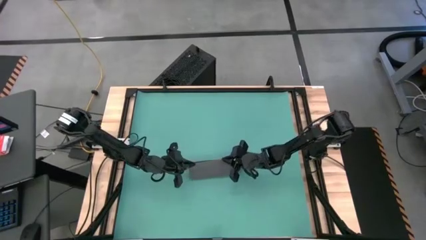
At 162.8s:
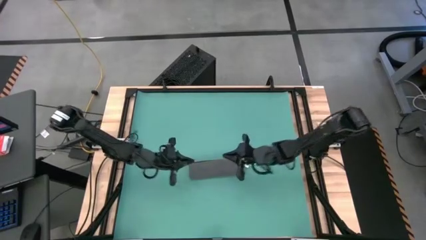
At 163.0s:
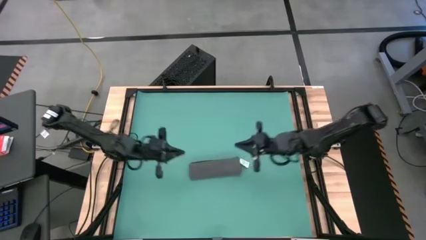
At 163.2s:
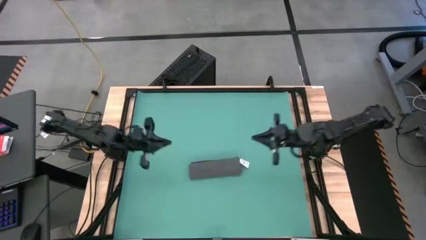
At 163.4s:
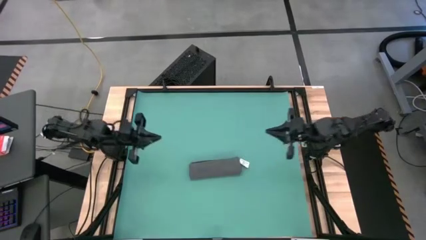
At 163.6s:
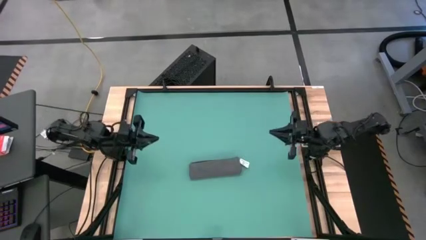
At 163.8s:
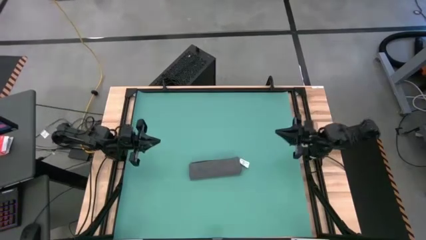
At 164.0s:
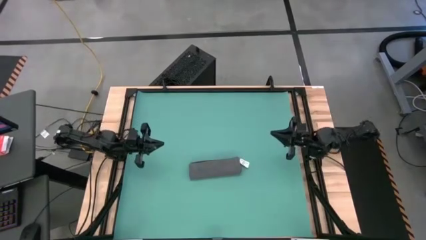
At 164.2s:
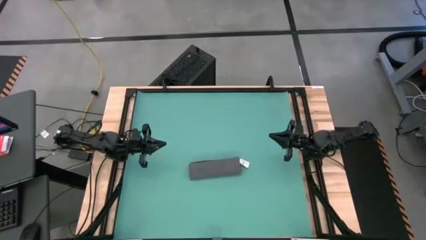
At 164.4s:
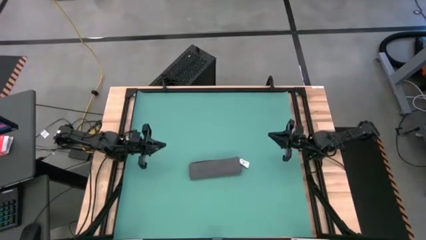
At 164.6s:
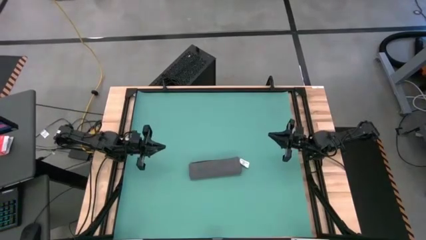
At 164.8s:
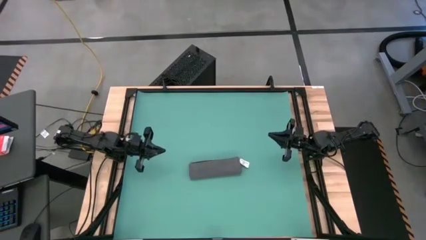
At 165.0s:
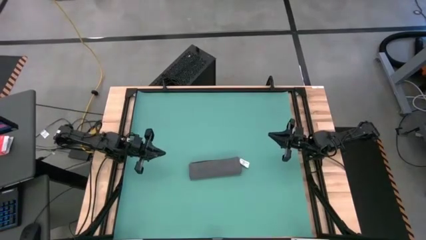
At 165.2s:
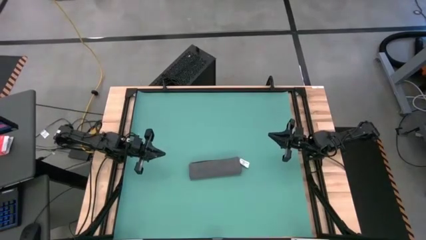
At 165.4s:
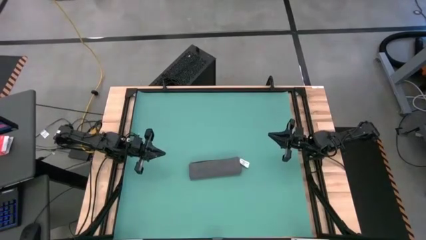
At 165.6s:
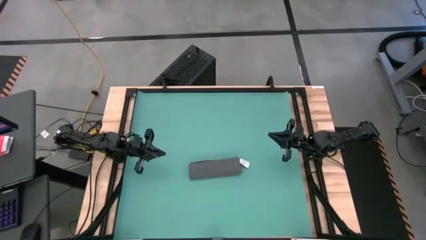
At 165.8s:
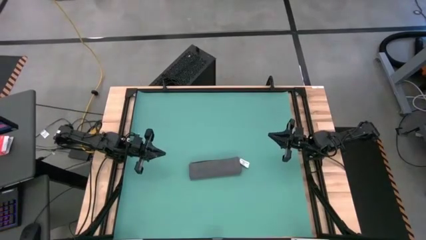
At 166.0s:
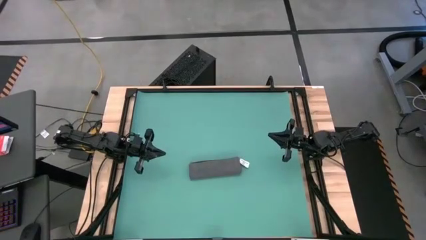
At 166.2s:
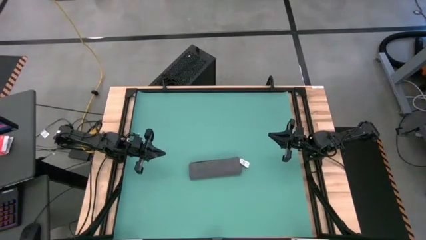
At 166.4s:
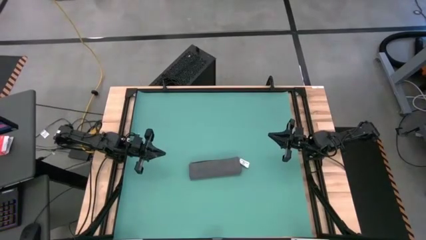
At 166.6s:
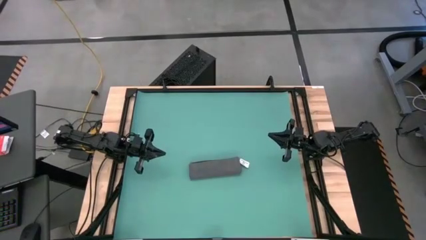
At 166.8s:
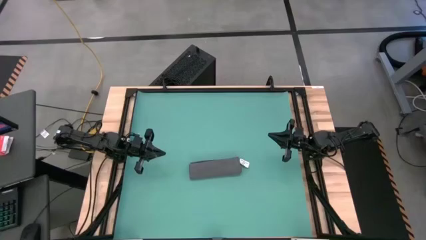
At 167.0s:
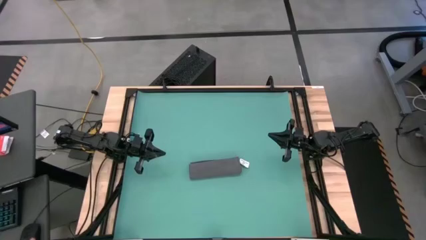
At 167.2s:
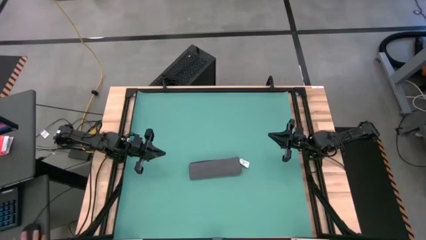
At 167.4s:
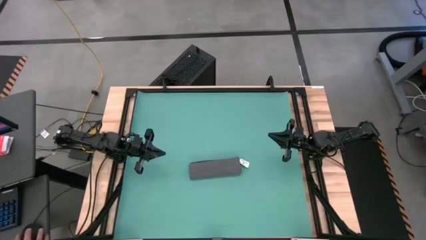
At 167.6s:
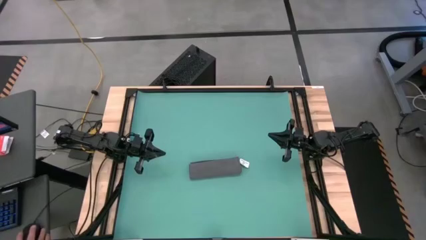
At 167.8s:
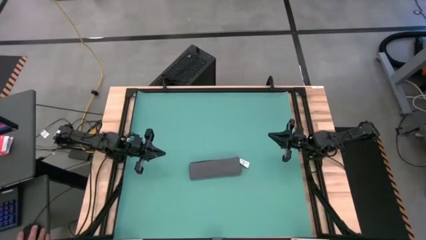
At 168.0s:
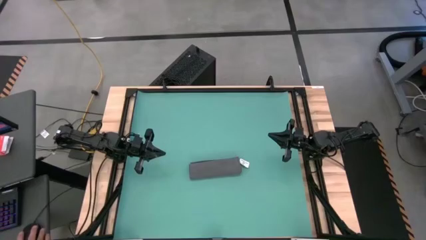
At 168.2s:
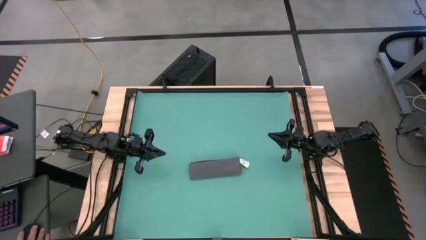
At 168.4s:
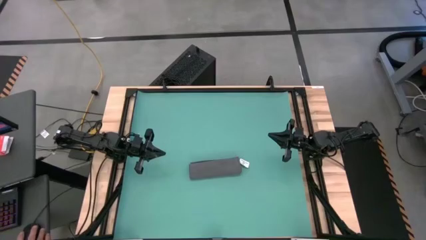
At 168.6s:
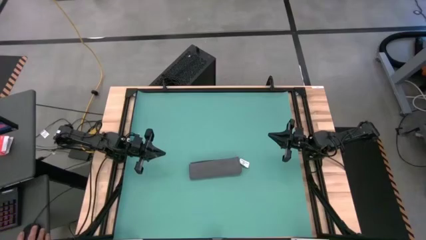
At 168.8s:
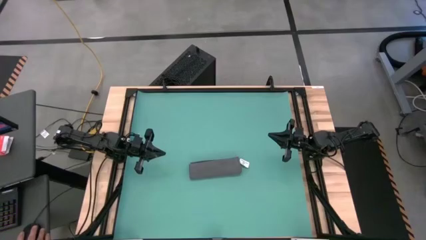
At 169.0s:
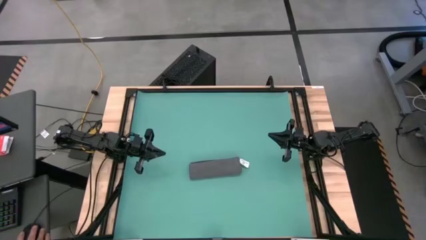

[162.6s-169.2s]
Task: Roll towel
Return to Home Position

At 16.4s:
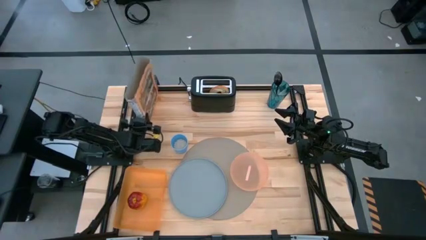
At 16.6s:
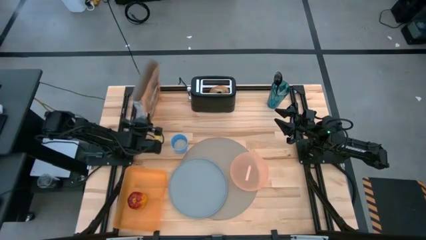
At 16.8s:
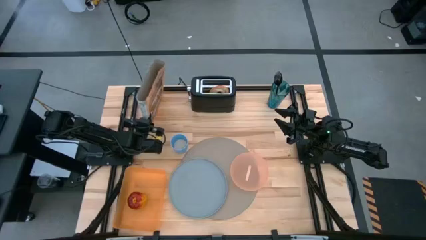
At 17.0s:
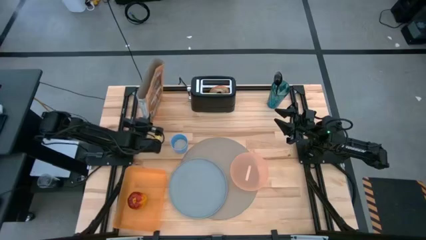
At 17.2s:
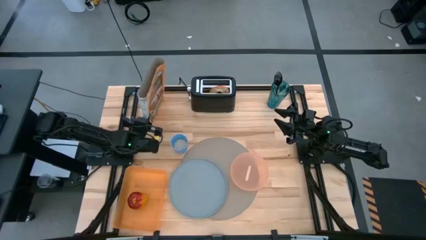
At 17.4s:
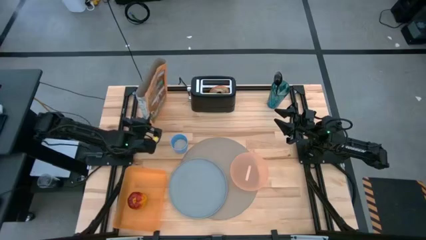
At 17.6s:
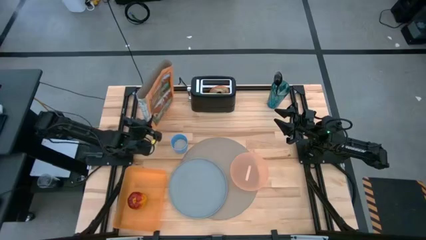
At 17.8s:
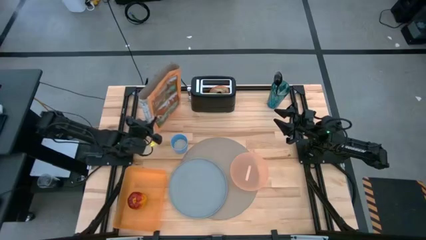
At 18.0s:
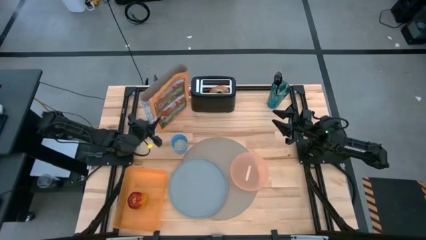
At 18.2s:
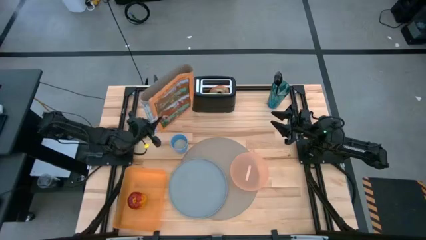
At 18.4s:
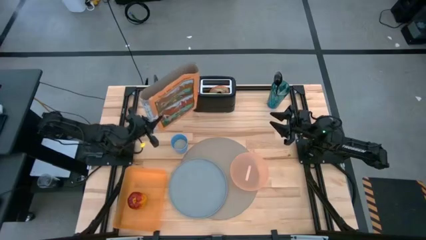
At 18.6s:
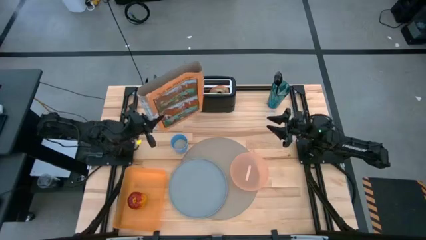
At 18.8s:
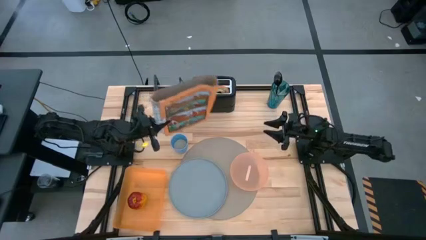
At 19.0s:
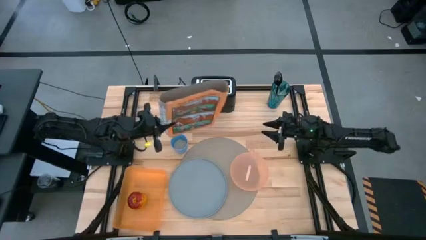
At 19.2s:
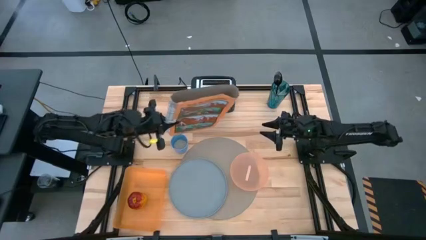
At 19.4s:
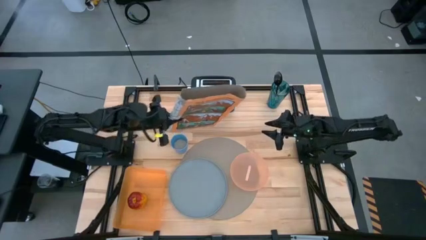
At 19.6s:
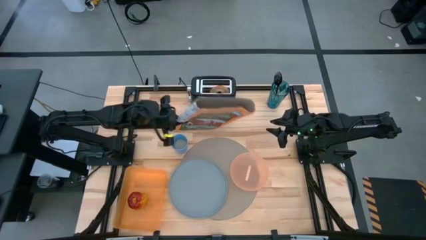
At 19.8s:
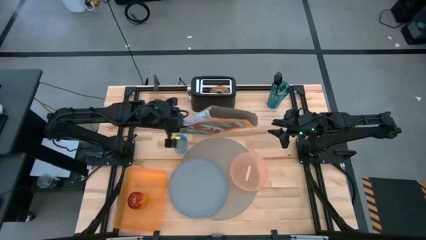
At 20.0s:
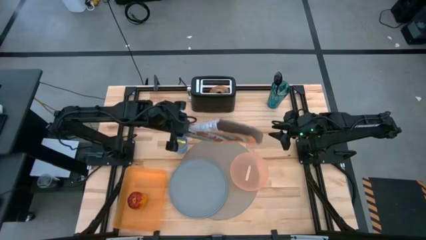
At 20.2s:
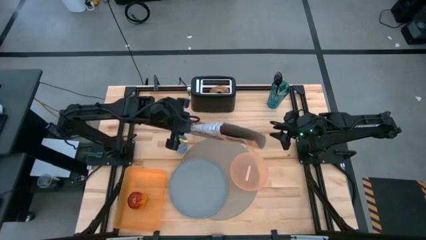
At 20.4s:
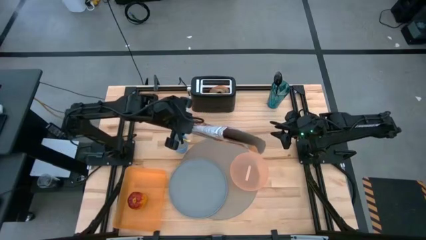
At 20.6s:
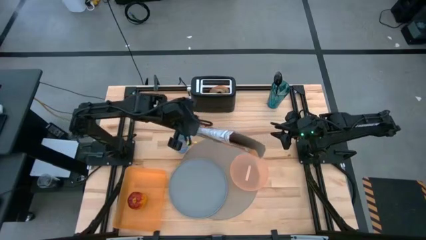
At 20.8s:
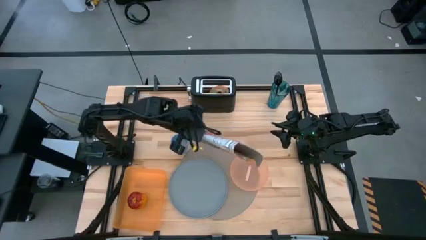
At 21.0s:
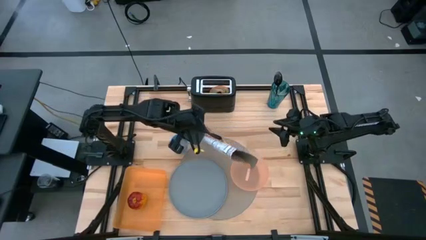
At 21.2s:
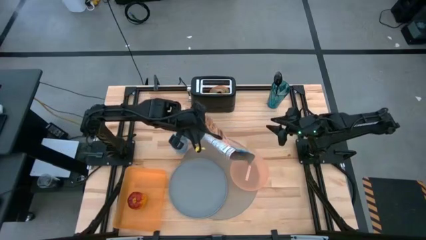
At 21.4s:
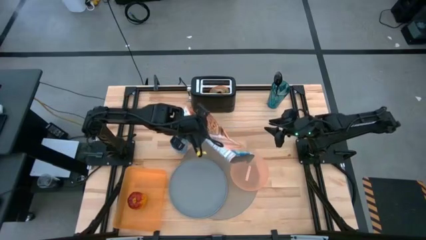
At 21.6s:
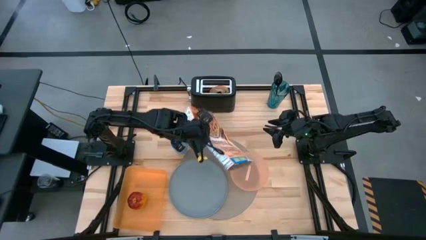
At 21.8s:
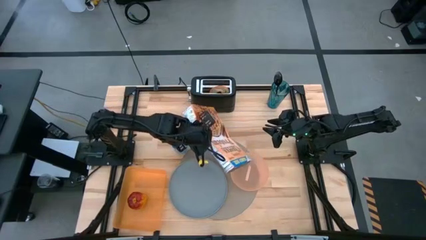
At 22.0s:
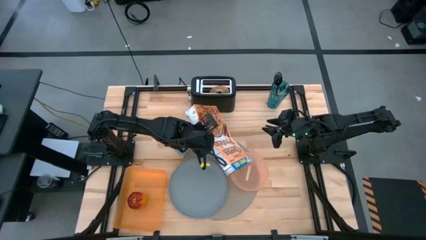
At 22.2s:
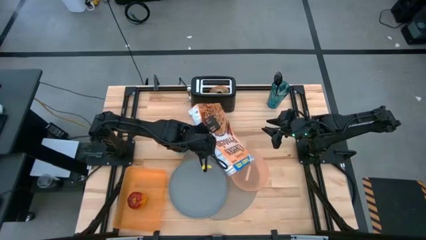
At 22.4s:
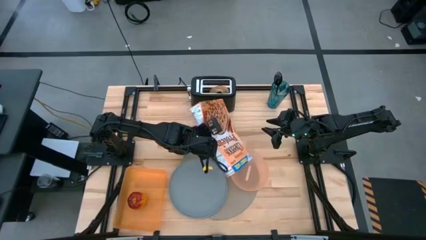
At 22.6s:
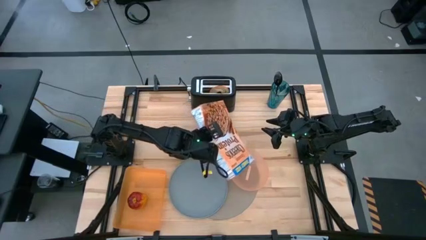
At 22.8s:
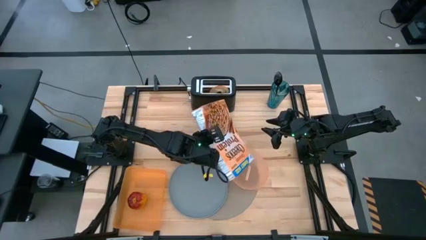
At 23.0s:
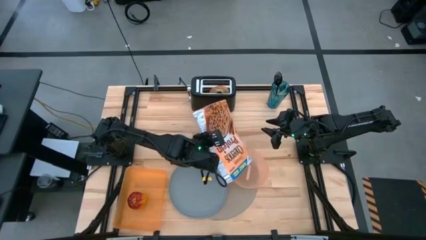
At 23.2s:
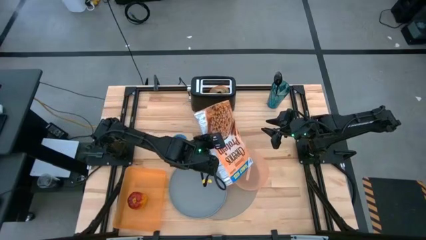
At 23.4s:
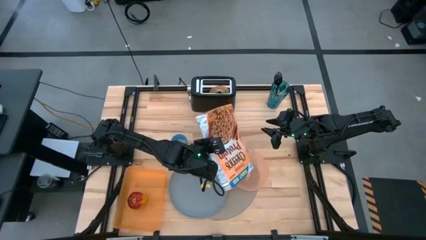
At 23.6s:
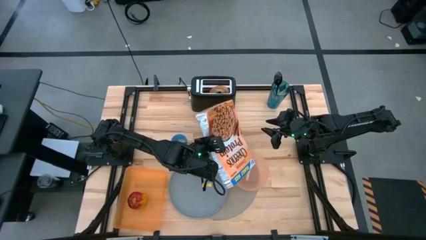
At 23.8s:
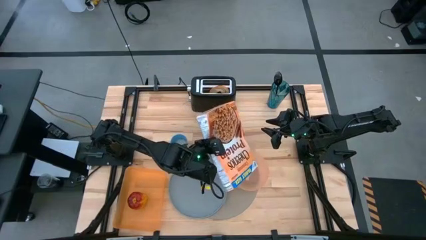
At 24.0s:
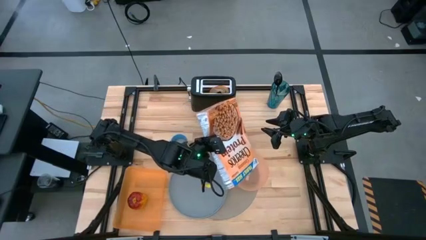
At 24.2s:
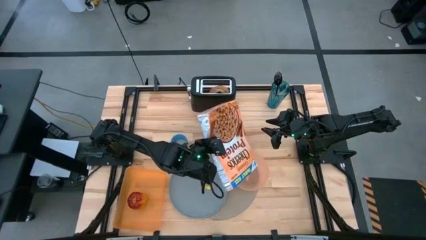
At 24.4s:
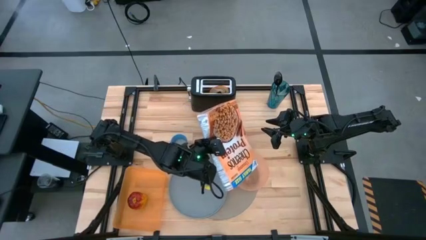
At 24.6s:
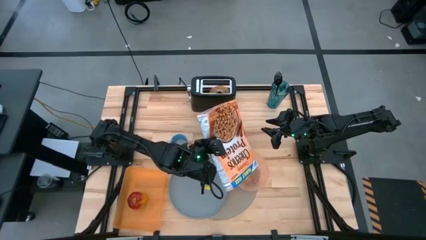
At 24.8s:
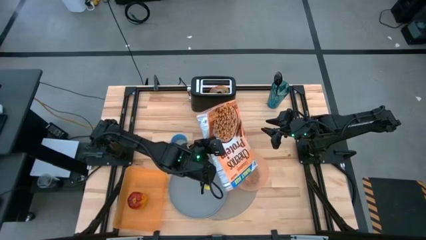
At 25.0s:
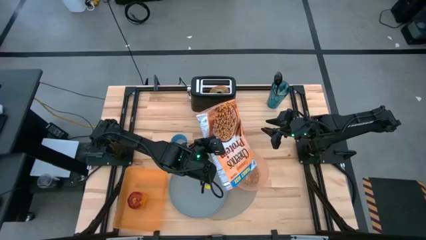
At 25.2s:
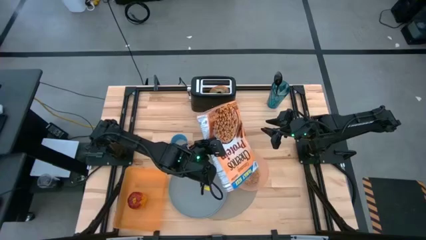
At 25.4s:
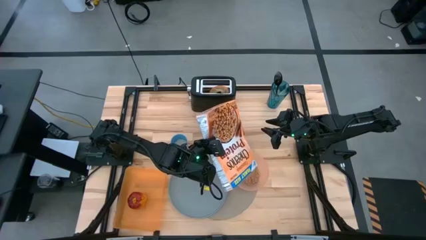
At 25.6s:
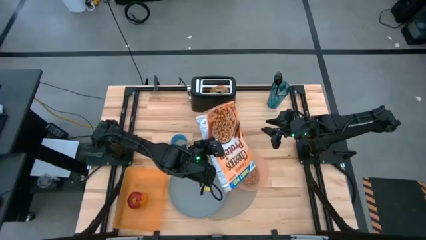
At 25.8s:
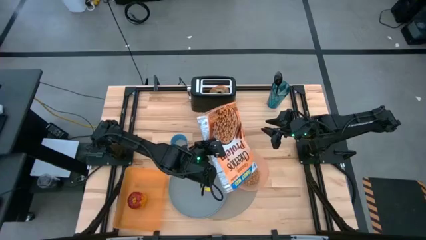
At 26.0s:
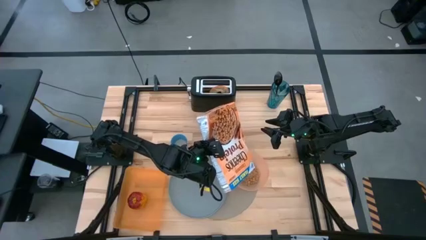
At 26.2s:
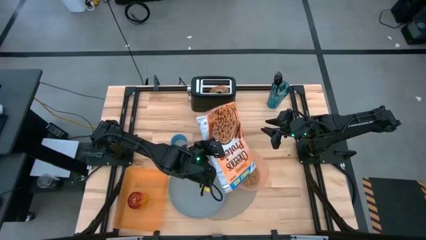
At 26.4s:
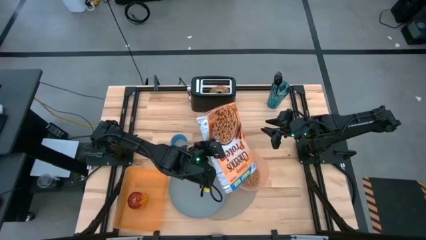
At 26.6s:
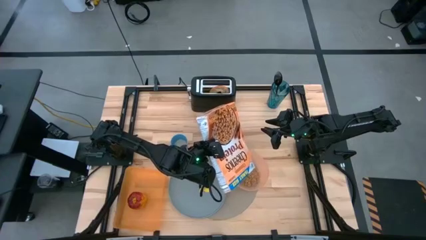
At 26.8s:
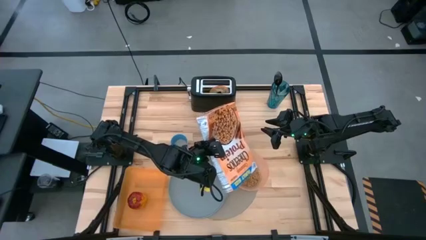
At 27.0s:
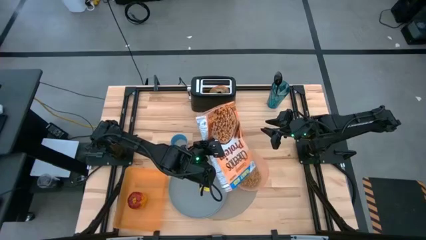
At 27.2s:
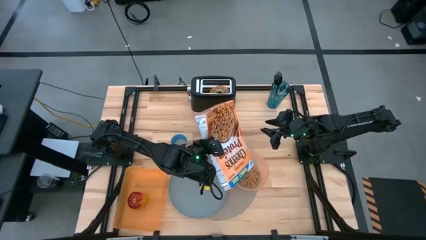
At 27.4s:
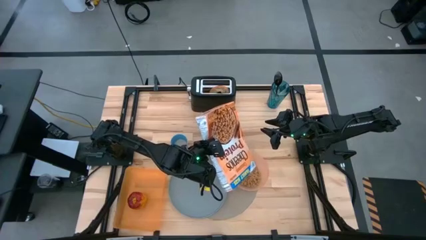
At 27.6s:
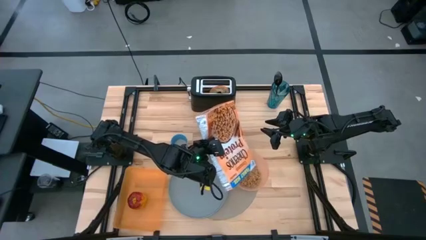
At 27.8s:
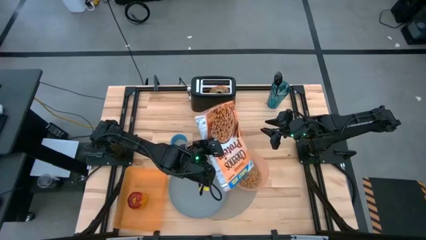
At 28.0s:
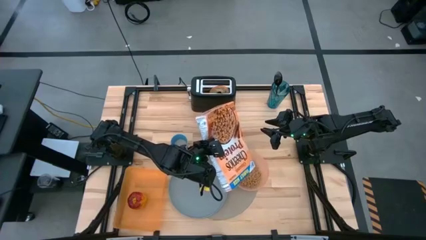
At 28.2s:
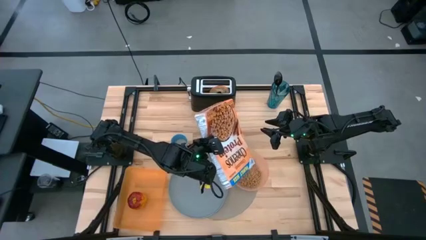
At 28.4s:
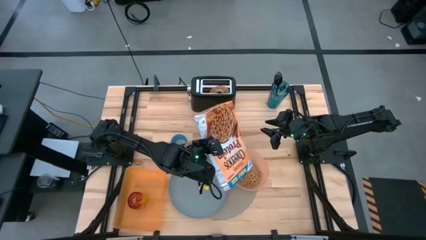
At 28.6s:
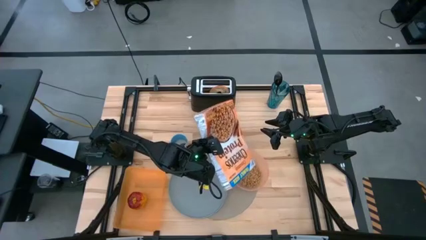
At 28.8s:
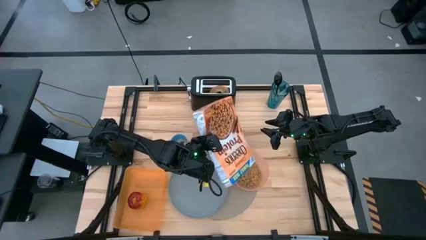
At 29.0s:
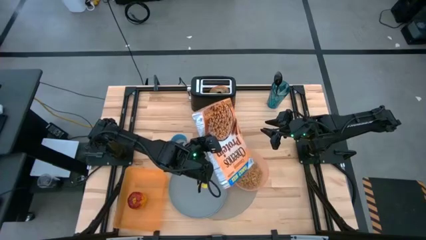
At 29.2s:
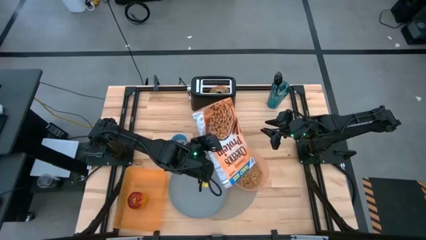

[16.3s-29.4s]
Task: Arrange a breakfast setting
Pour the cereal from the cereal box into the light orange bowl
